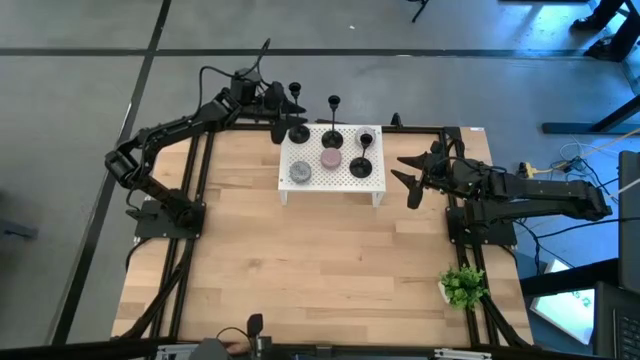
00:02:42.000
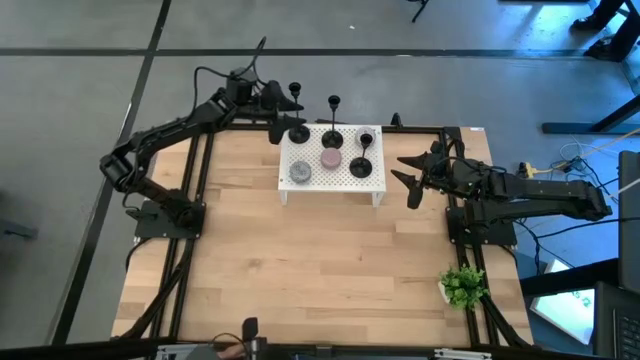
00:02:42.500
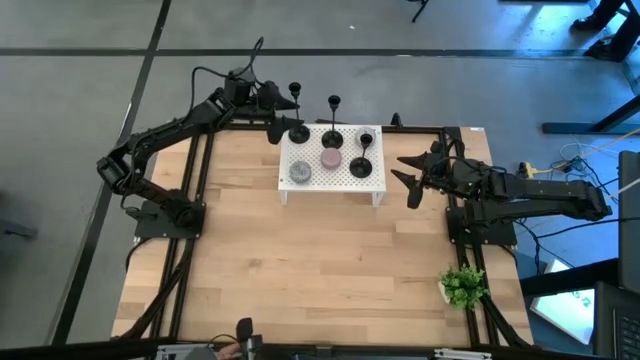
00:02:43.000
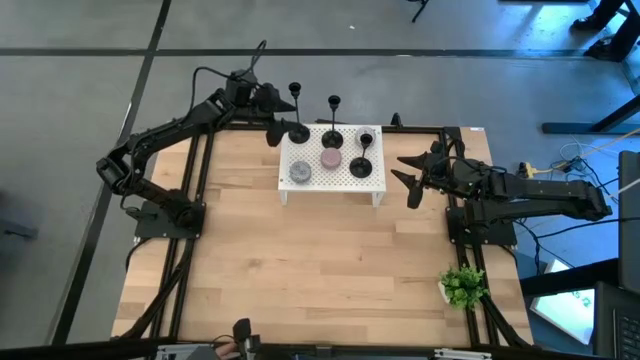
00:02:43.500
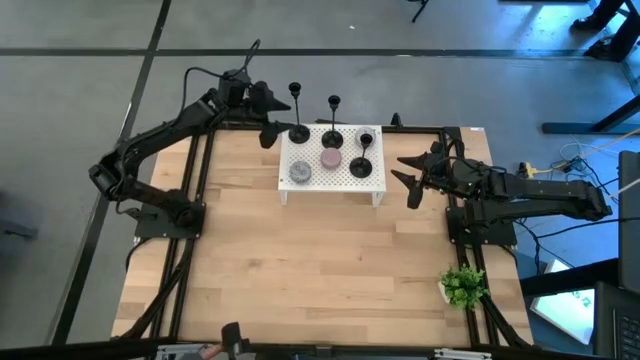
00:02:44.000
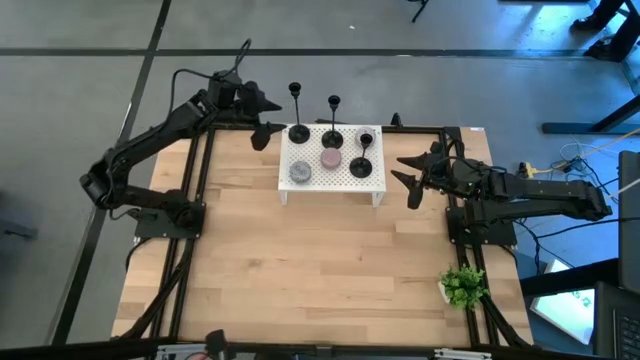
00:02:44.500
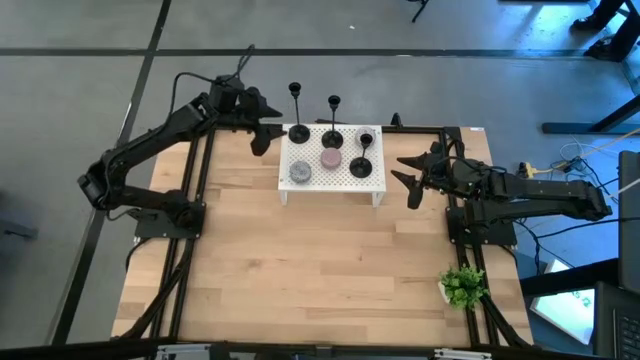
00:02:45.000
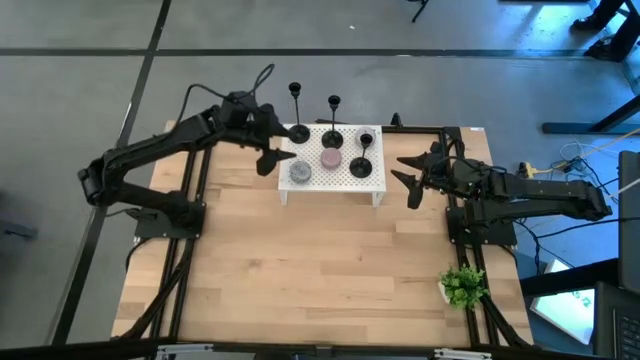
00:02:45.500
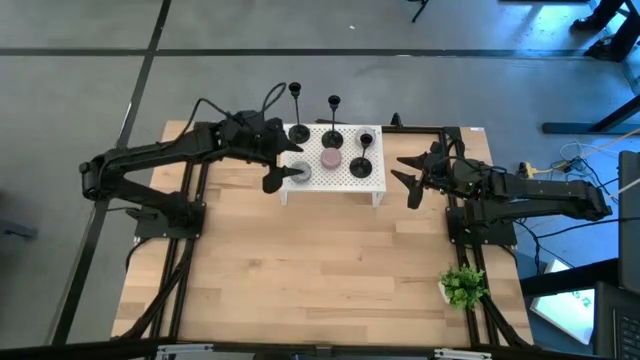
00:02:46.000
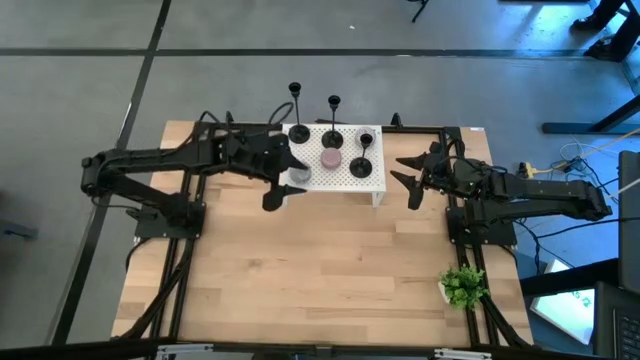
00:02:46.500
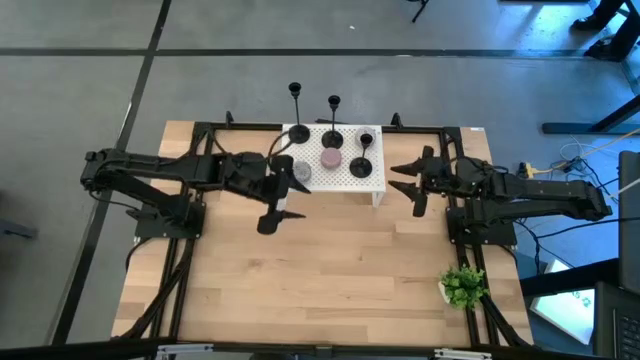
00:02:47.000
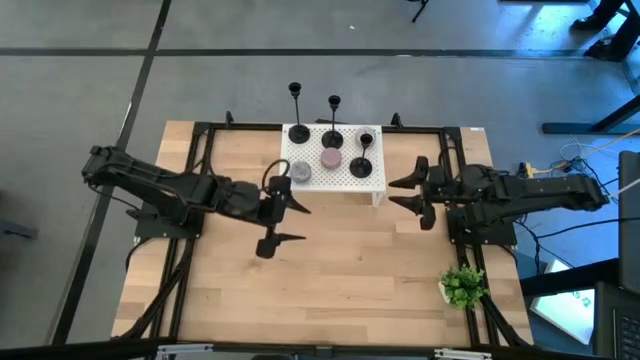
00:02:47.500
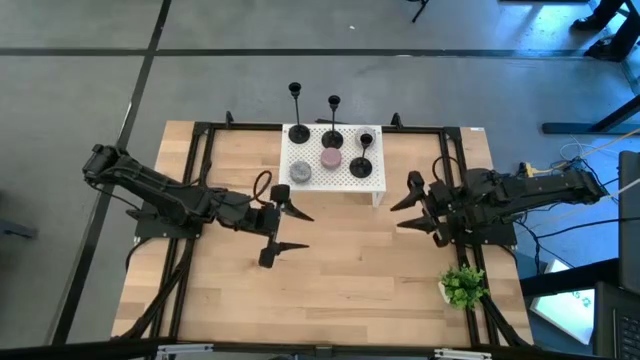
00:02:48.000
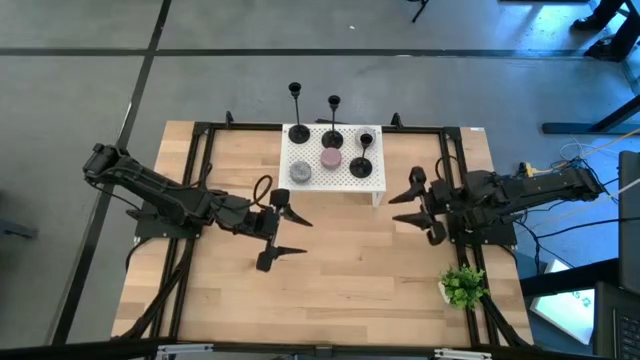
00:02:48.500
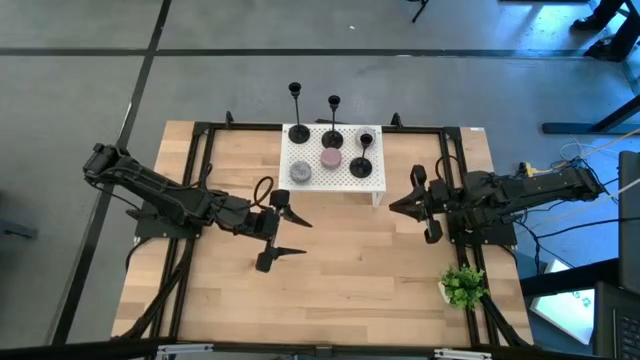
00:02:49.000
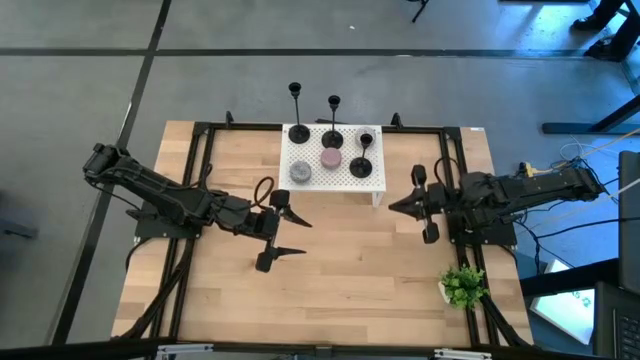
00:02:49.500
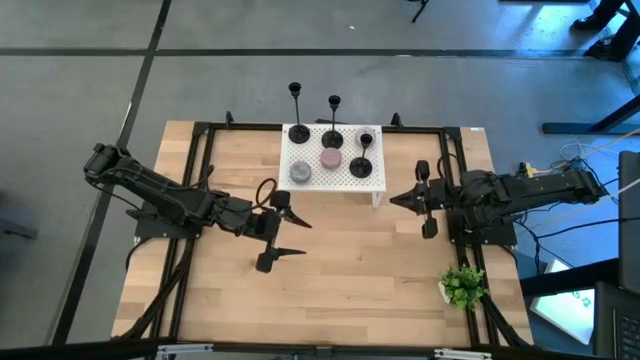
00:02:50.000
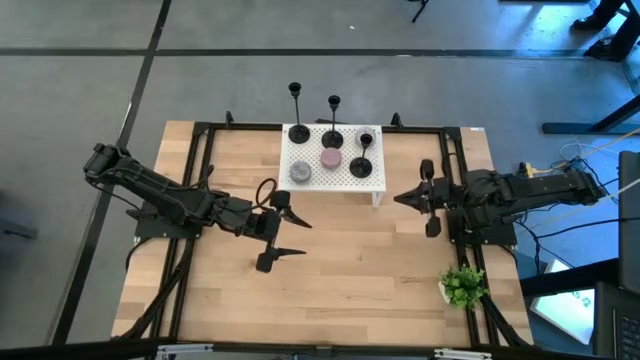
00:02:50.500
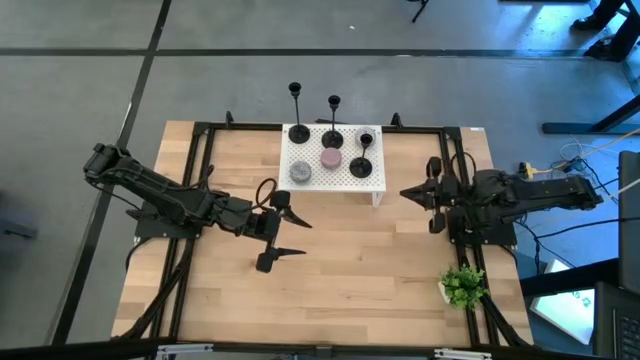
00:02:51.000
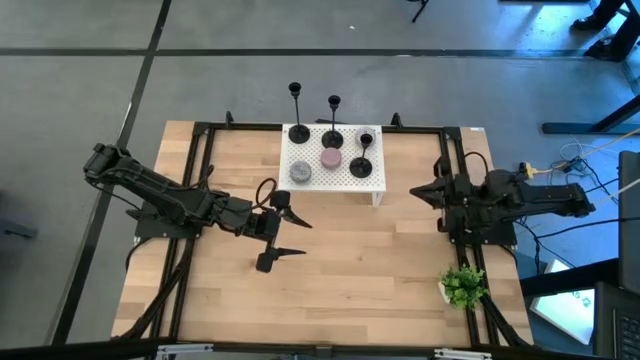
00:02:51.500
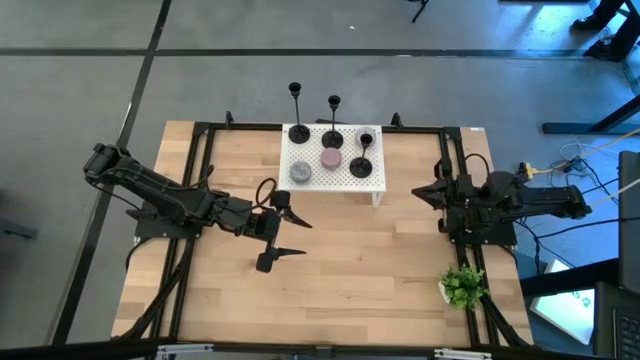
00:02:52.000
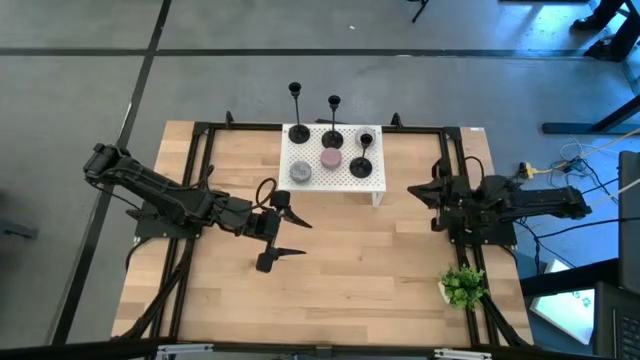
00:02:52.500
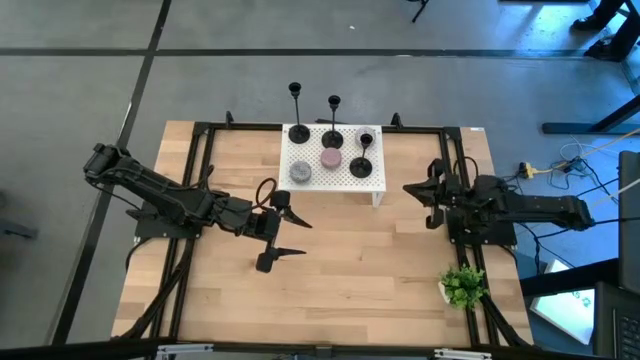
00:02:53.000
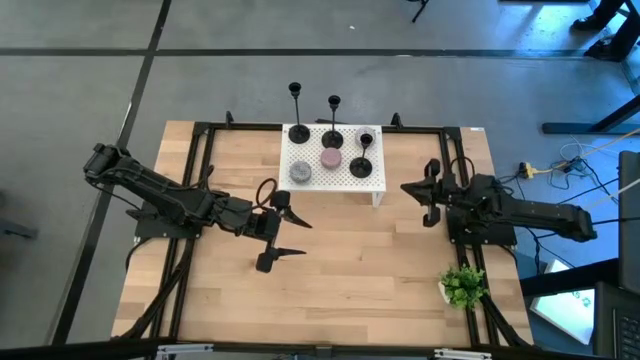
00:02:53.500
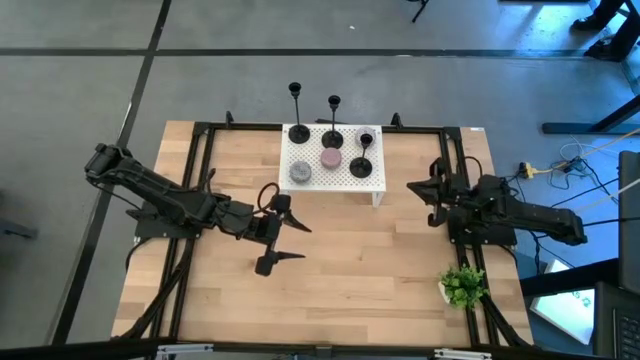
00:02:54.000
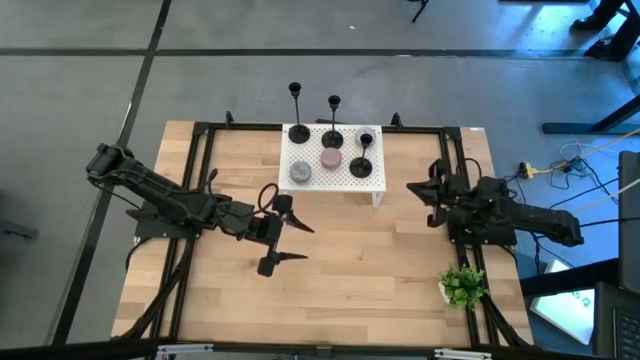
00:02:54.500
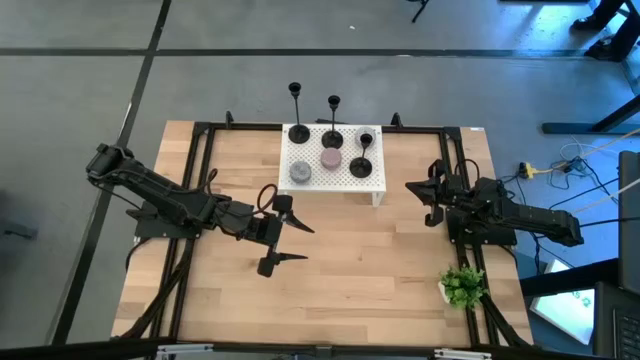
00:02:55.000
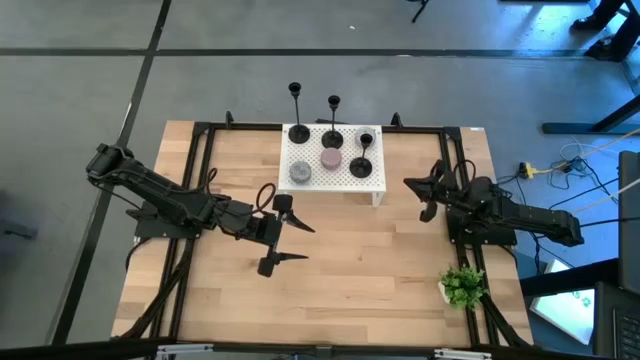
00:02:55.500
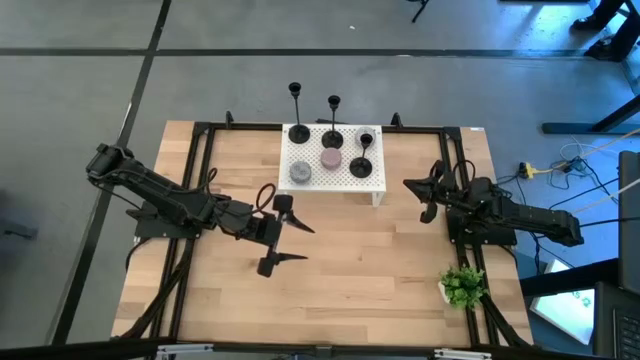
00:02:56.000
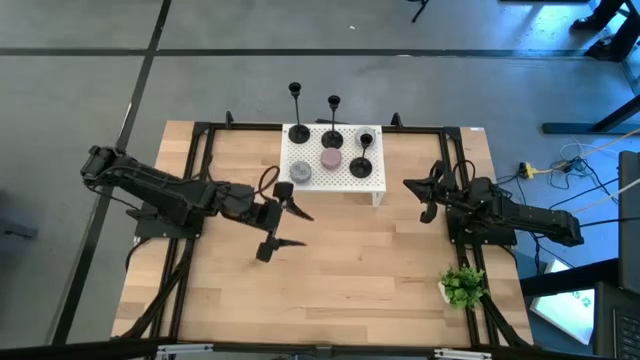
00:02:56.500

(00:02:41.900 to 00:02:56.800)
Task: Pick & Place candle stick holders
Return to Home Position

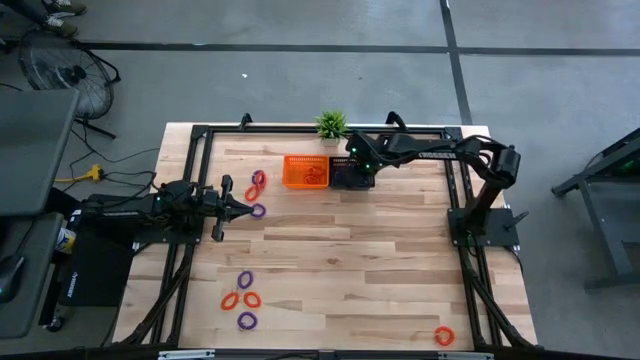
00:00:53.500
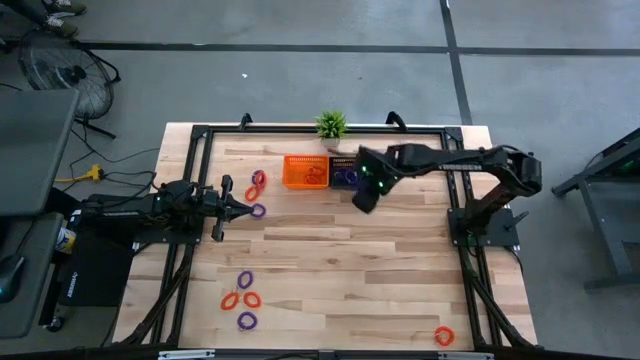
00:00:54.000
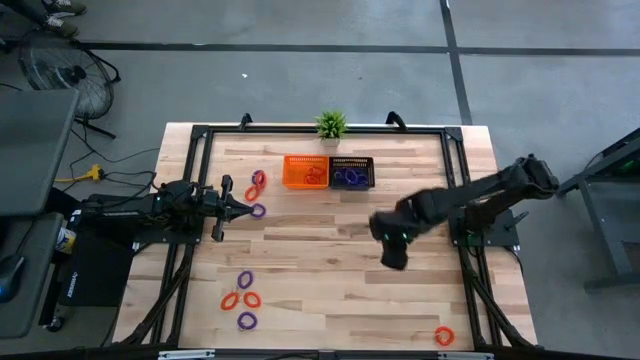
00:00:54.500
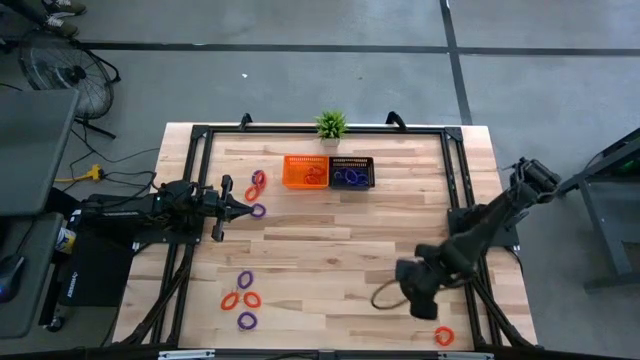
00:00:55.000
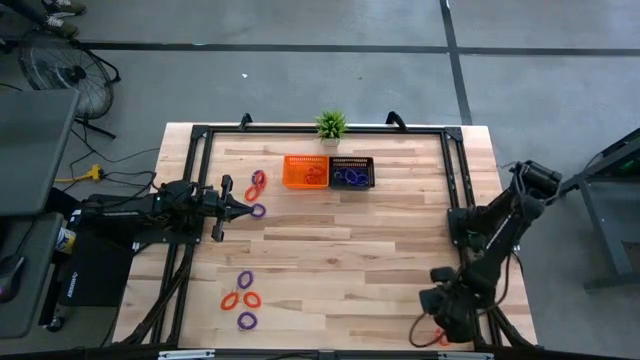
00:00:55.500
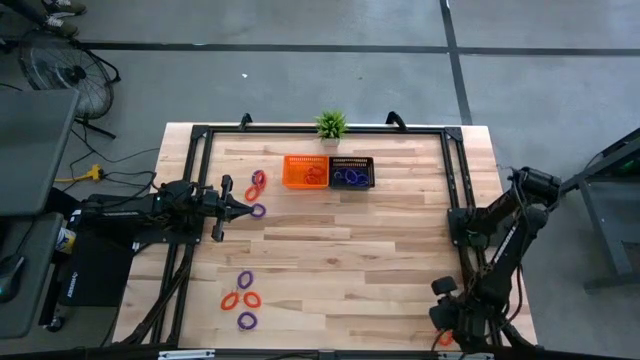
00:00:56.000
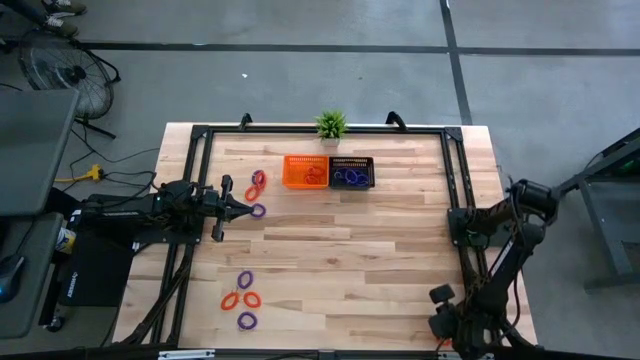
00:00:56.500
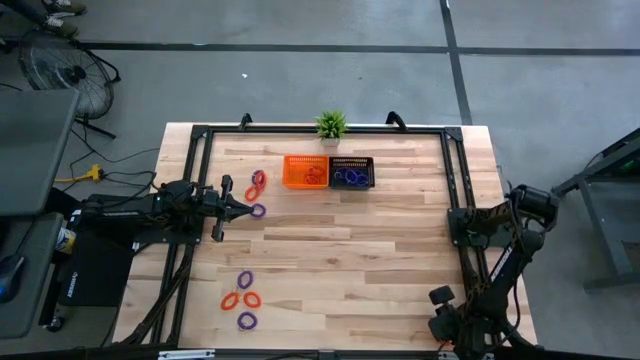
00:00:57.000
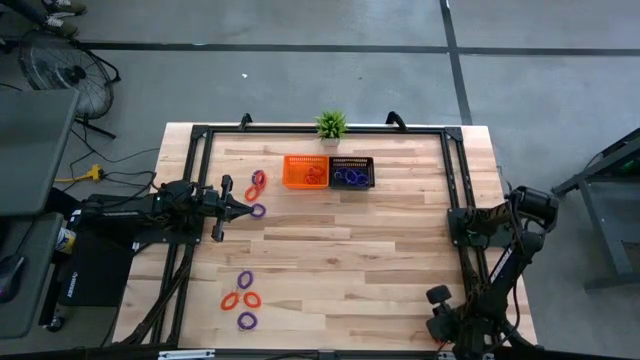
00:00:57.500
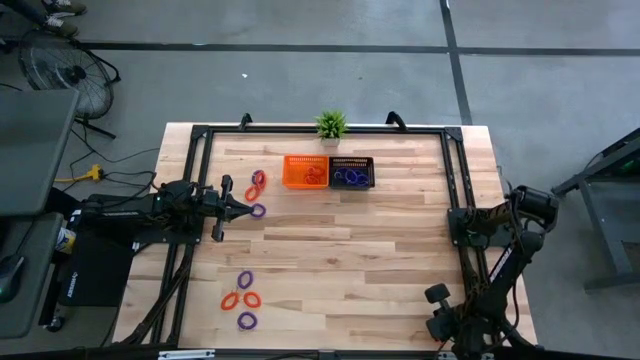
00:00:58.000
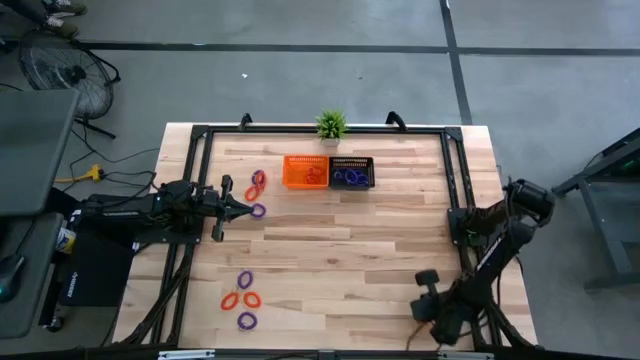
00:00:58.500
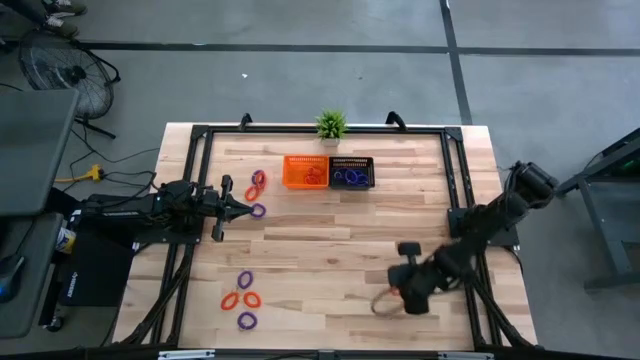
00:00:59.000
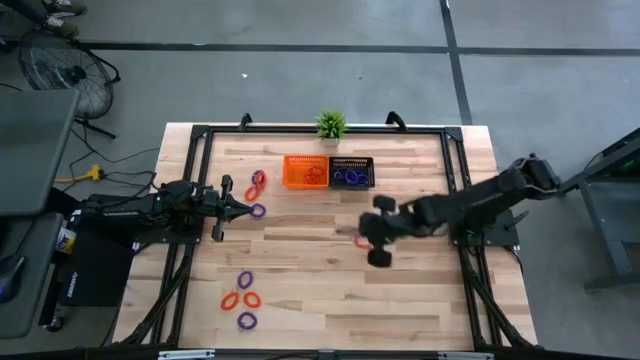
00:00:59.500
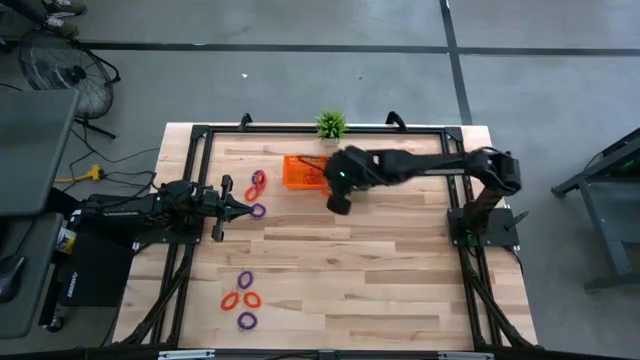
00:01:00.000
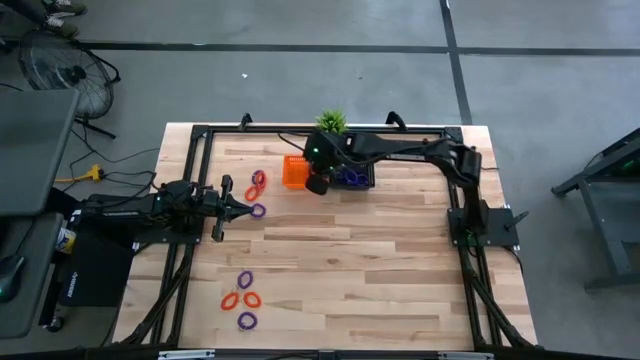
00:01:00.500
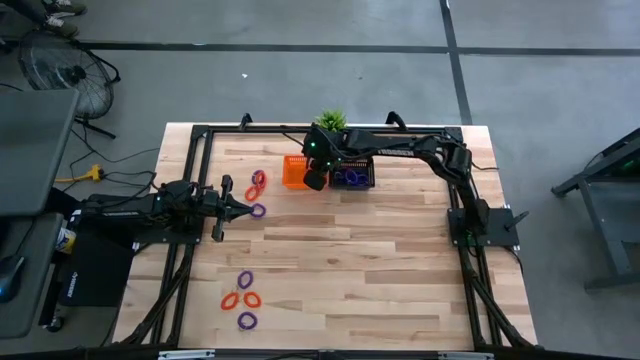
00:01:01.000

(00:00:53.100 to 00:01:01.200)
Task: Sort spring keychains into baskets
Put the orange spring keychain into the orange basket
